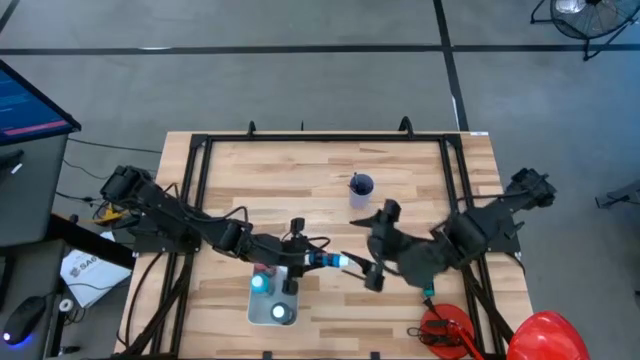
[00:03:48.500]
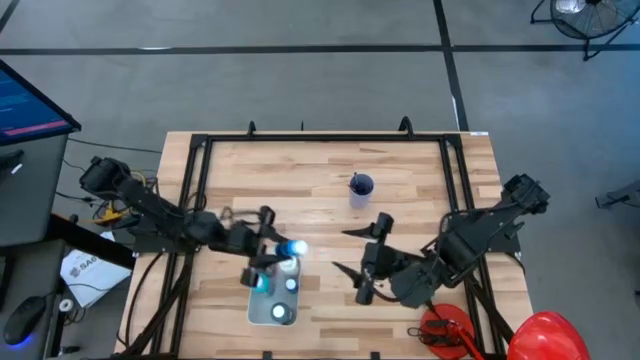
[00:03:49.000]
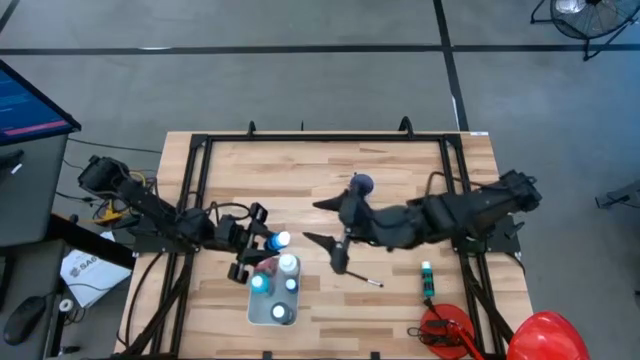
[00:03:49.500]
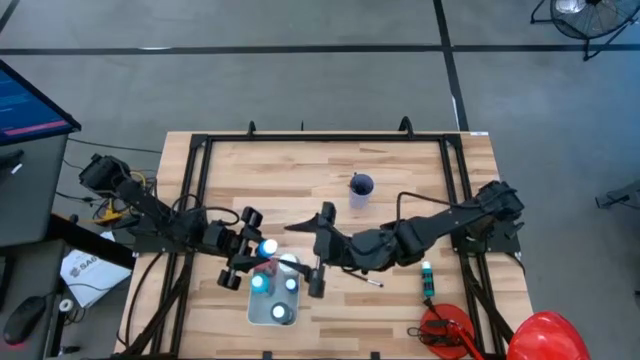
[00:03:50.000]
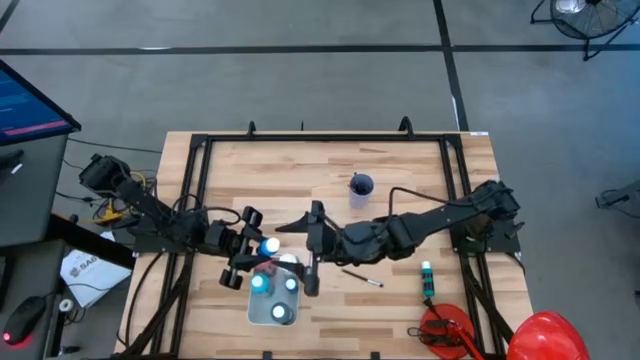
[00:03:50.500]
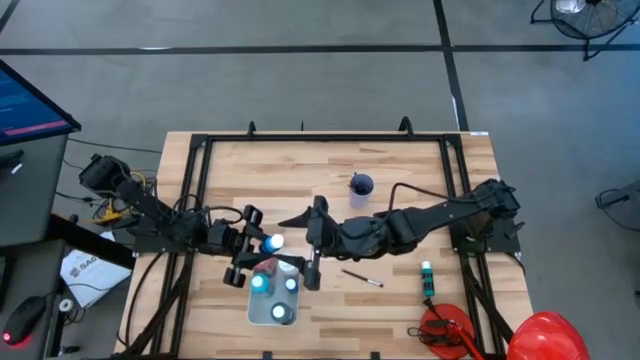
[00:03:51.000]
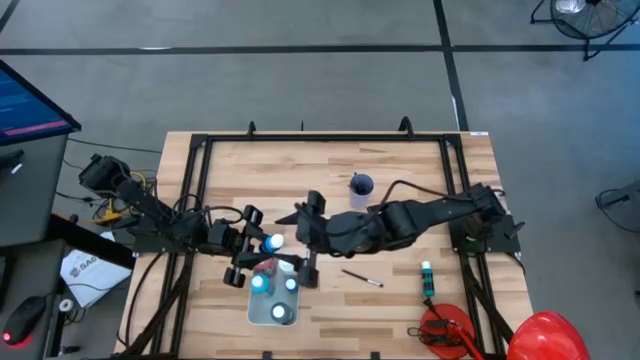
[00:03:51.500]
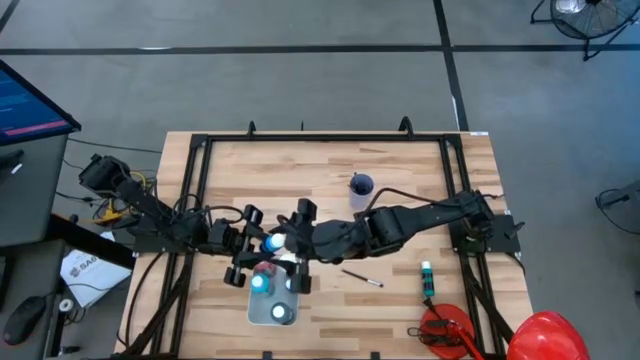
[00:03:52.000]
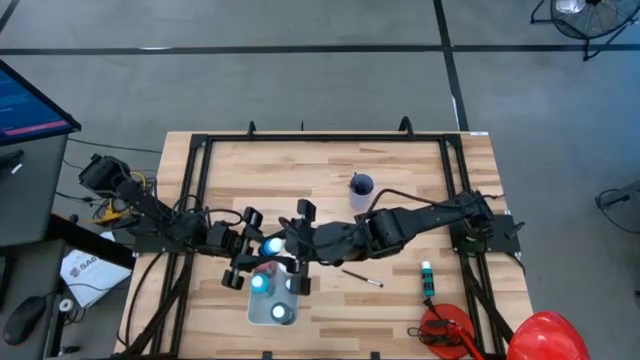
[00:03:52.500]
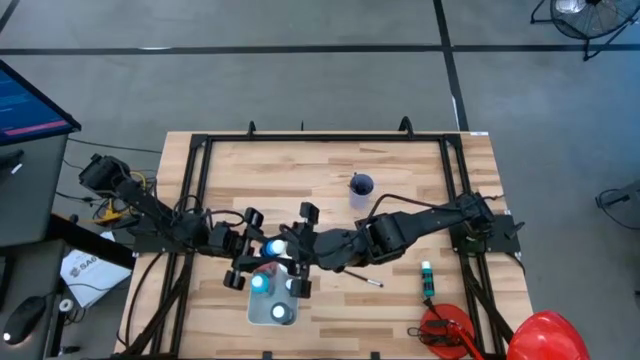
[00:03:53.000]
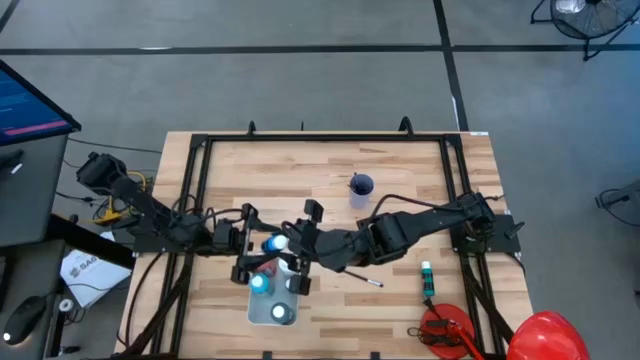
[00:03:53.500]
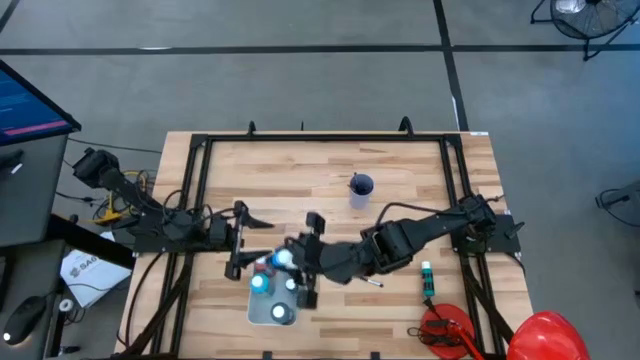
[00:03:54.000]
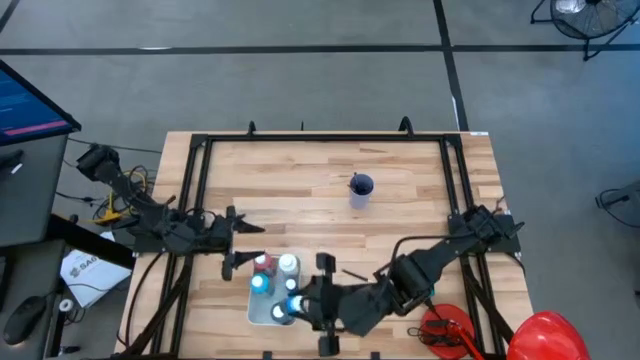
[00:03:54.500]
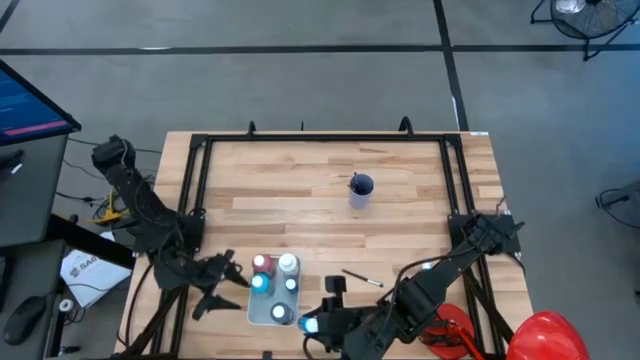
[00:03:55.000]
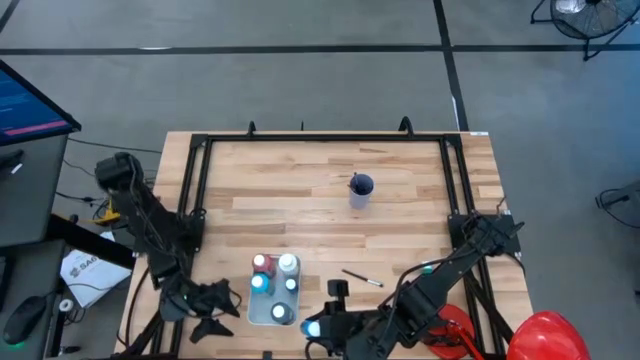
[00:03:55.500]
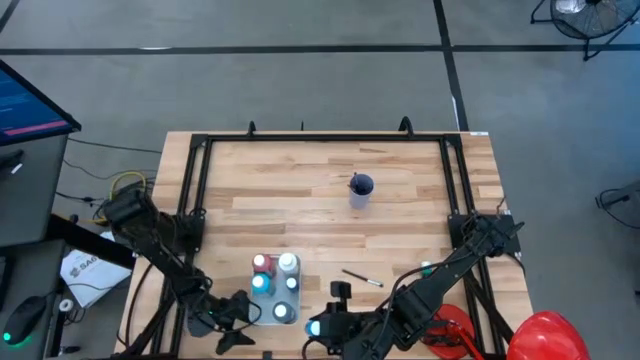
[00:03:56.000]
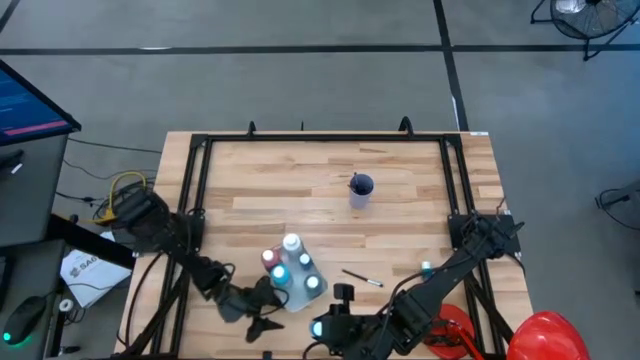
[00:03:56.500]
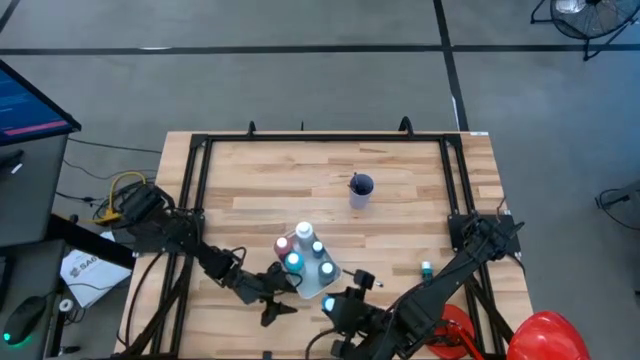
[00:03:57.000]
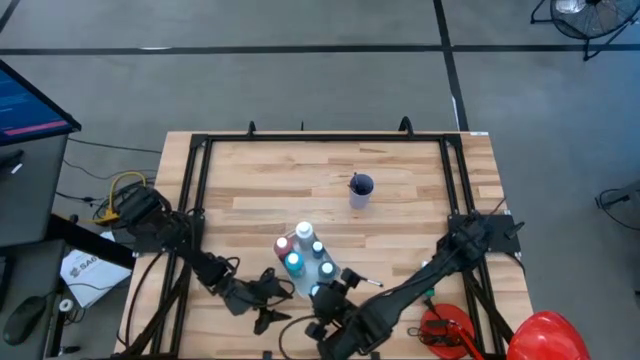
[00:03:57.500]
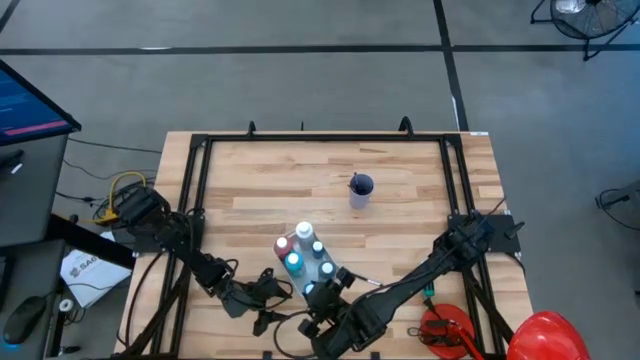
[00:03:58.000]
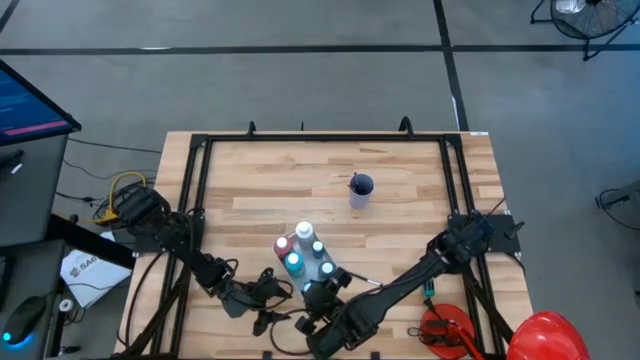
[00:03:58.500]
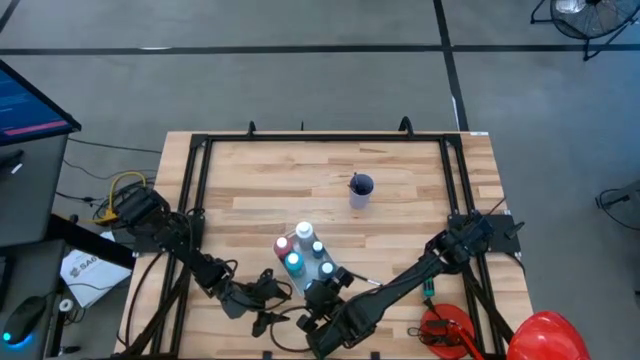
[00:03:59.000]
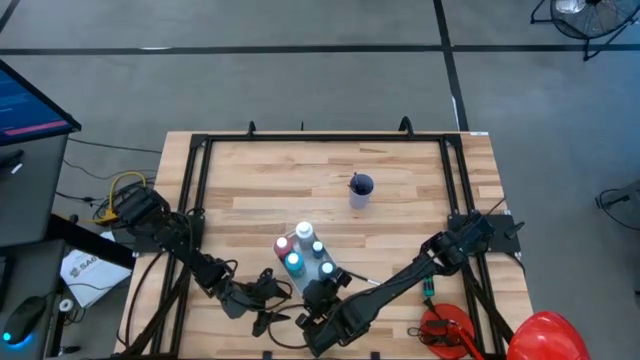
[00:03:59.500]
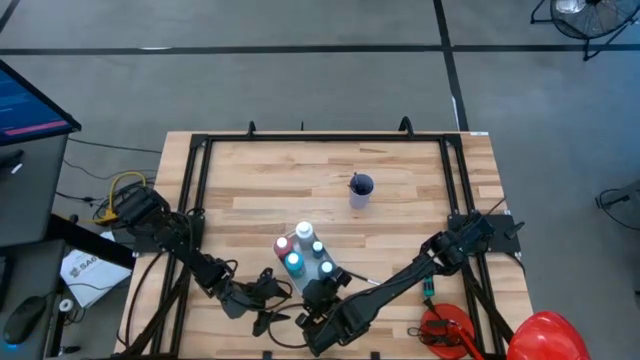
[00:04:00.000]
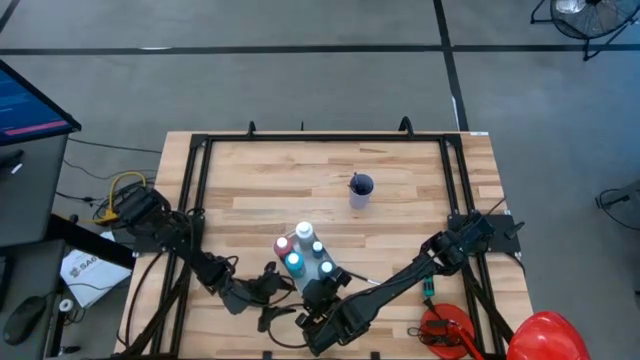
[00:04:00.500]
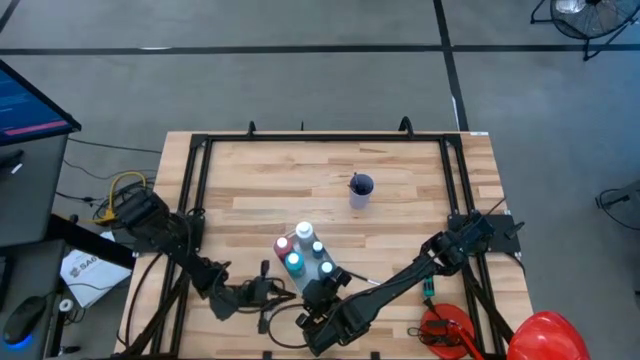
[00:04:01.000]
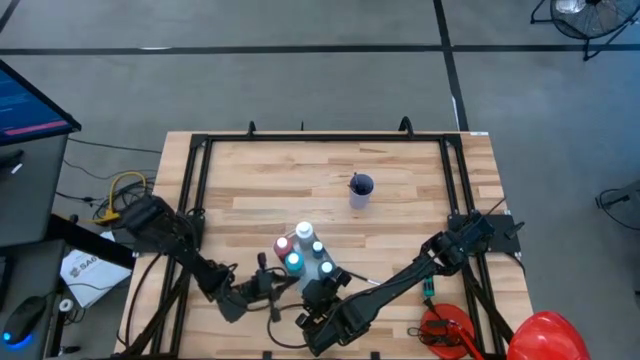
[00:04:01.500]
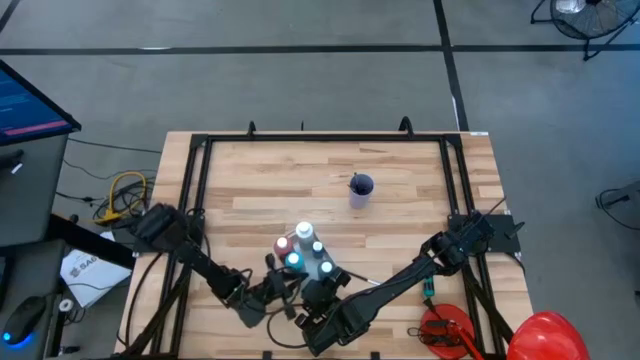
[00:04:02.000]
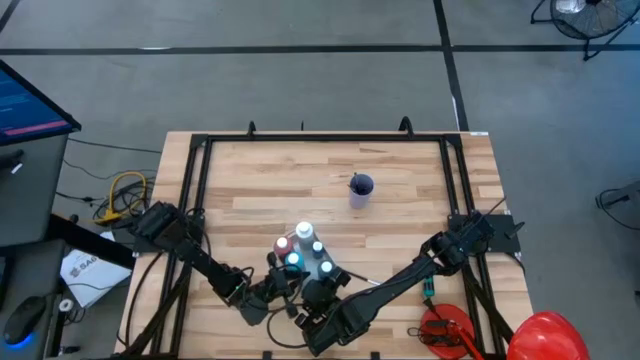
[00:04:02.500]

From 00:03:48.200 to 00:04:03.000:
Task: Pick & Place Paint Supplies
Put the black blue paint bottle into the white bin

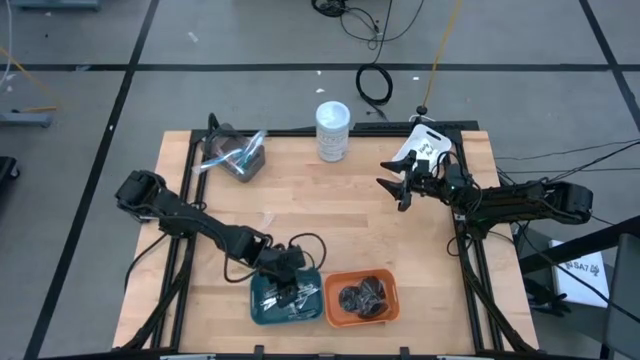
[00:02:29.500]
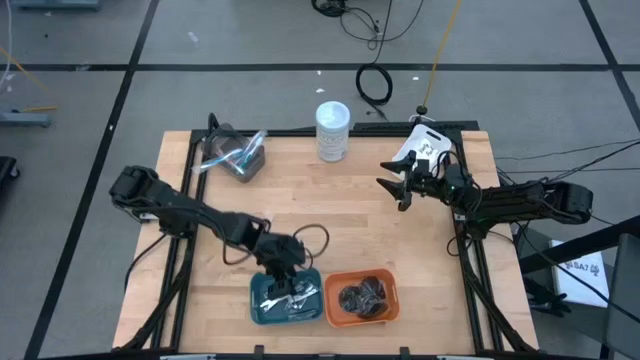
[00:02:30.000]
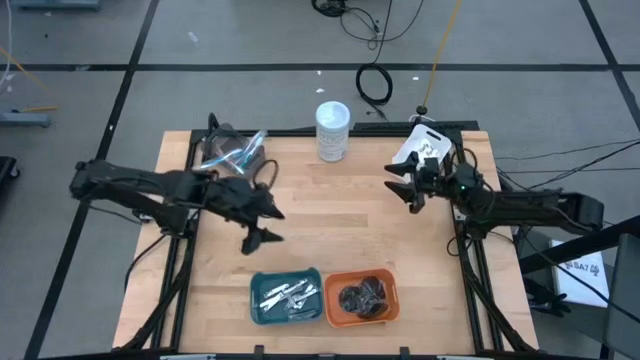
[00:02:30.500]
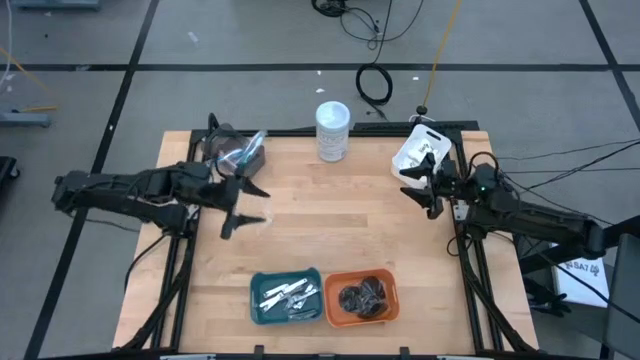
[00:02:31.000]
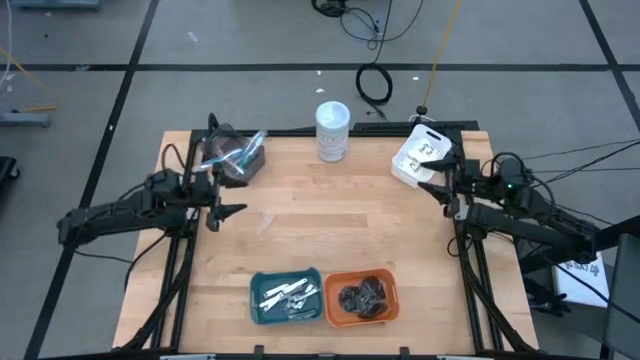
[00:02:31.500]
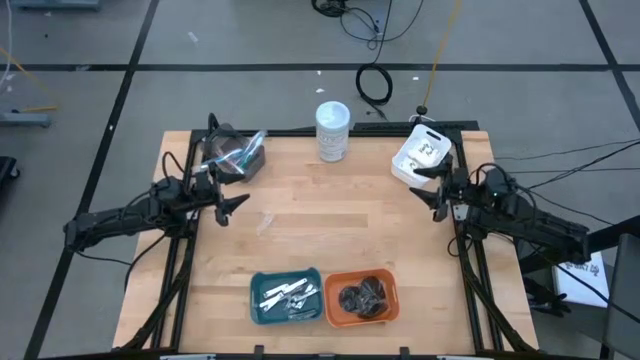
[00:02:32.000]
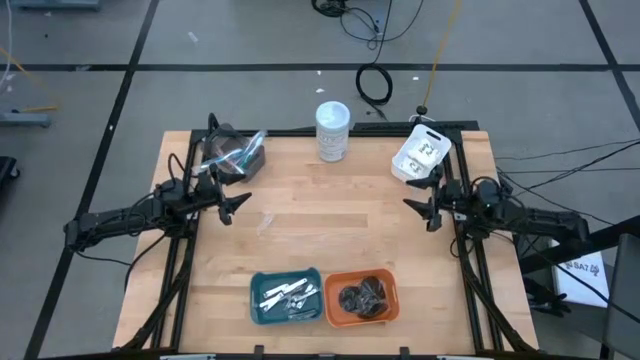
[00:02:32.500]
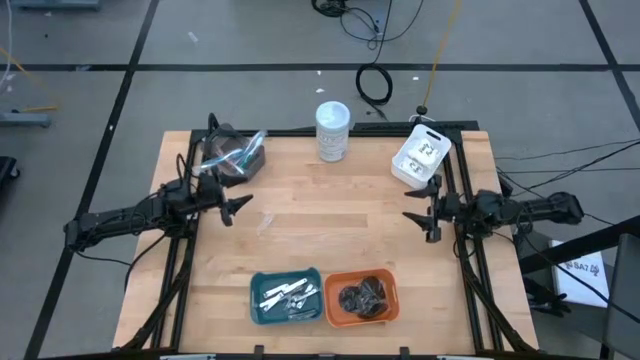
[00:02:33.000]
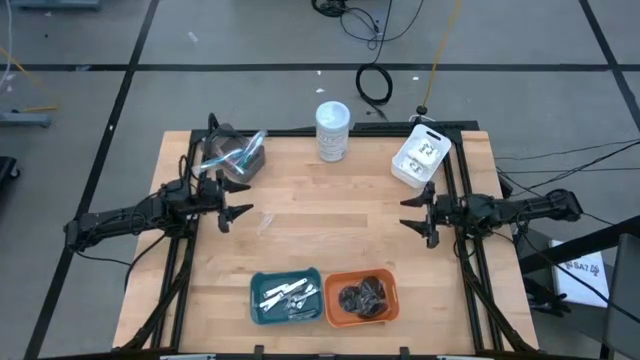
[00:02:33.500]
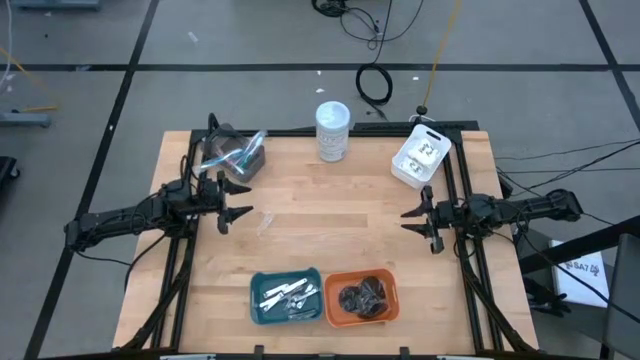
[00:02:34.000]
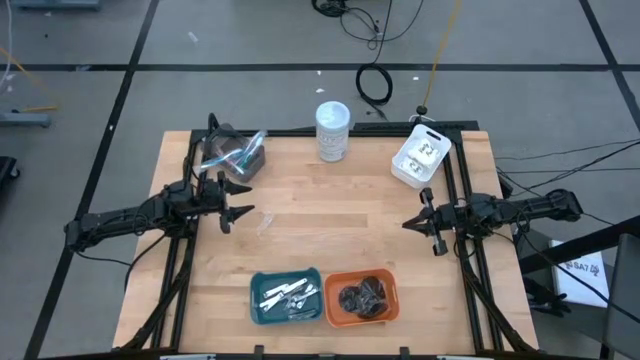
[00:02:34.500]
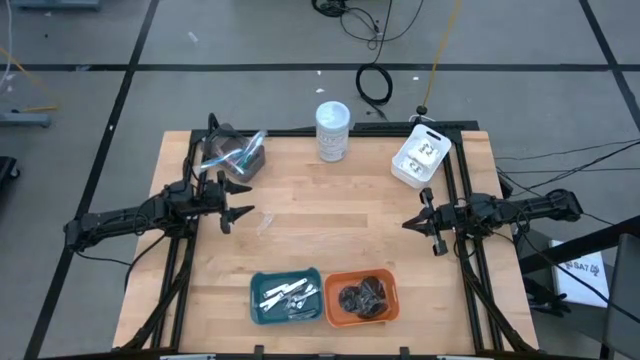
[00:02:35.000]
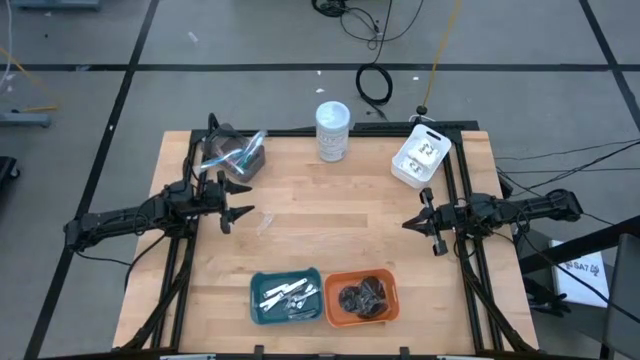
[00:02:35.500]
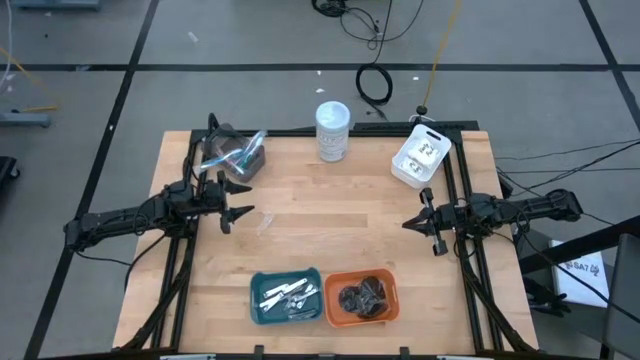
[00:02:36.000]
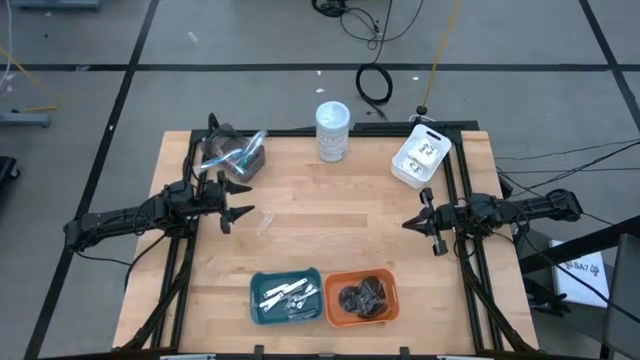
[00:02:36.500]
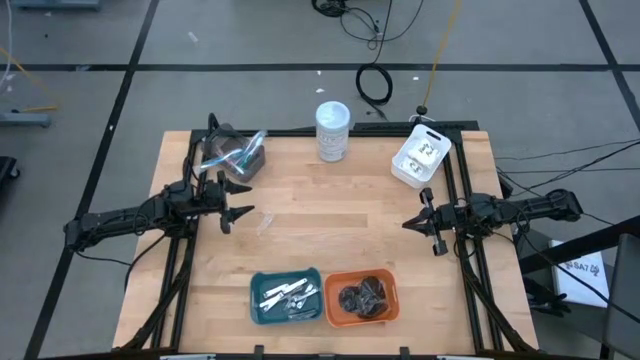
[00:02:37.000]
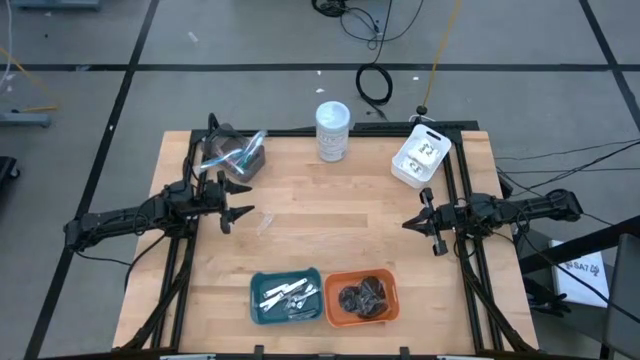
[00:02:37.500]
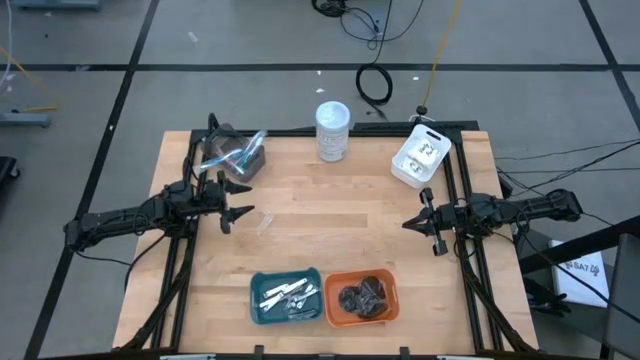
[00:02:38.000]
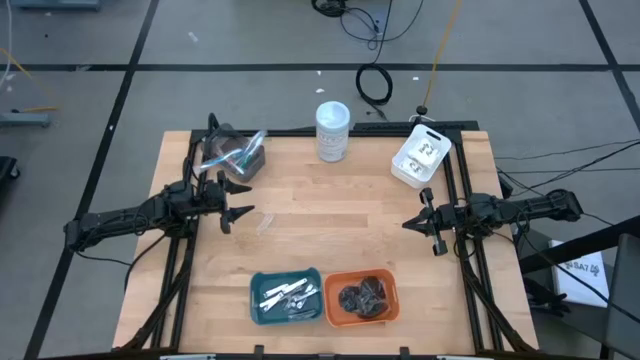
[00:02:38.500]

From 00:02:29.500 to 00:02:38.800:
Task: Pick & Place Travel size toiletries
Return to Home Position
